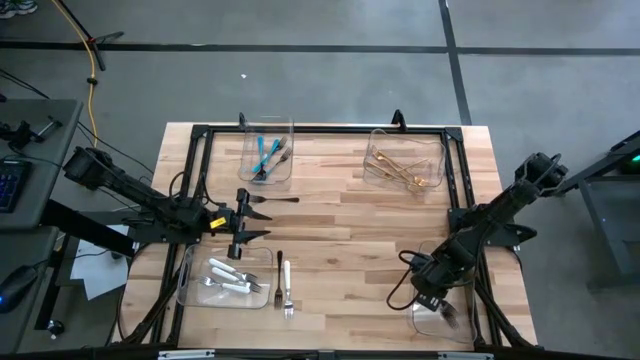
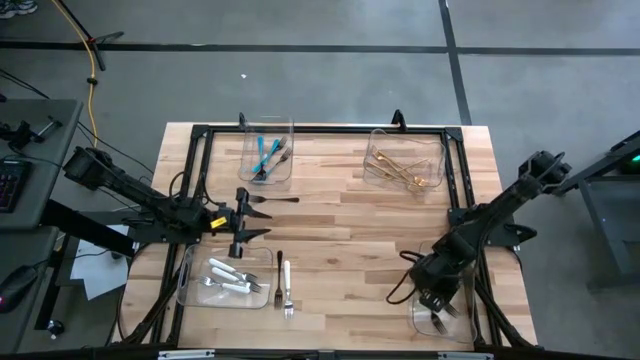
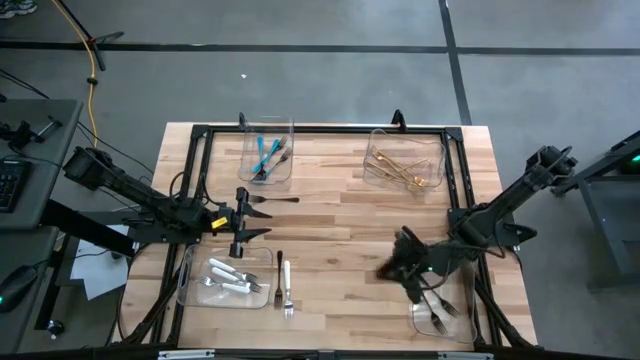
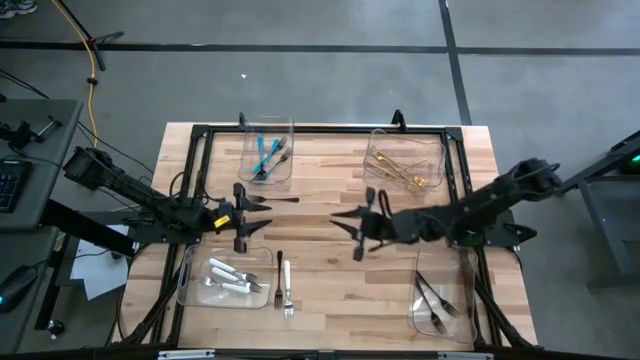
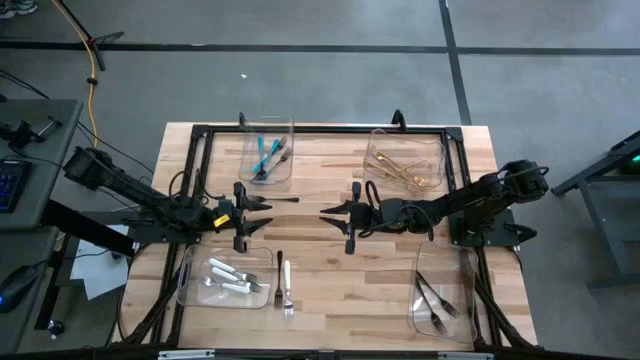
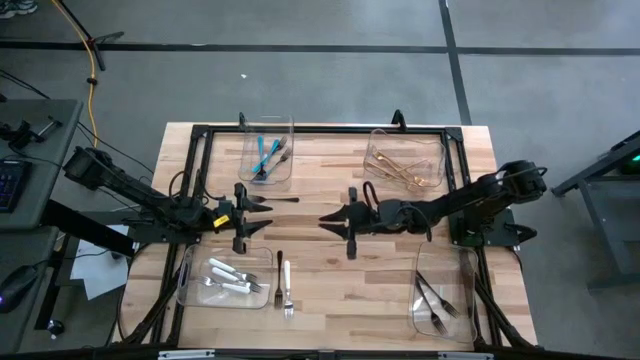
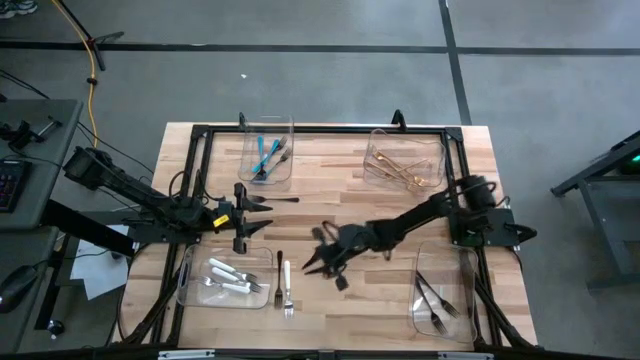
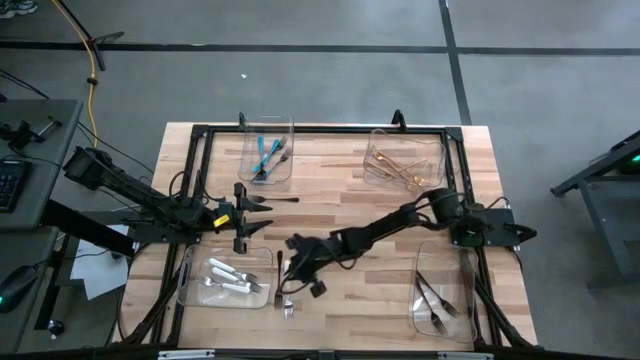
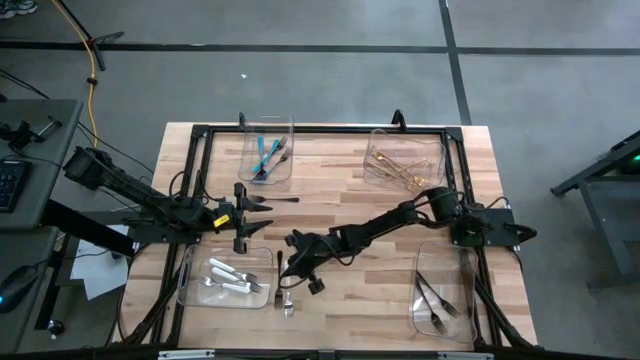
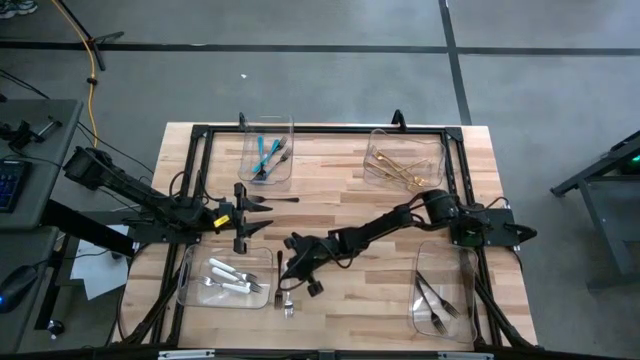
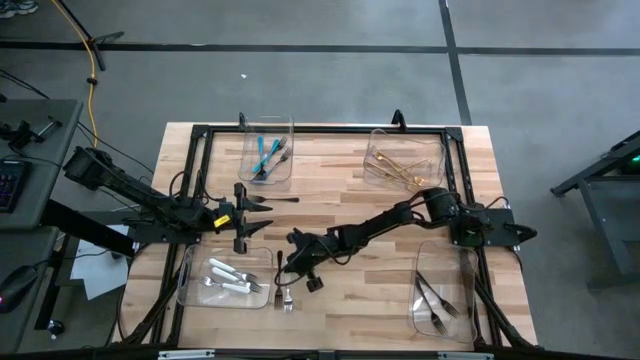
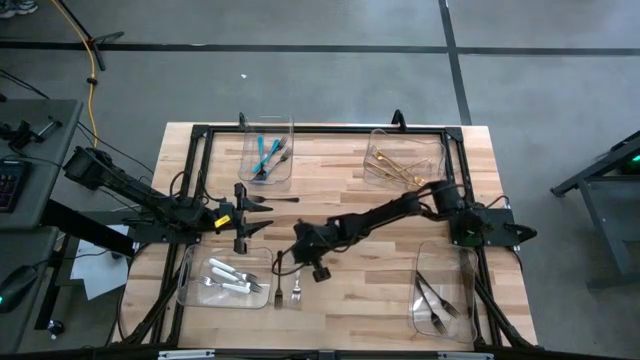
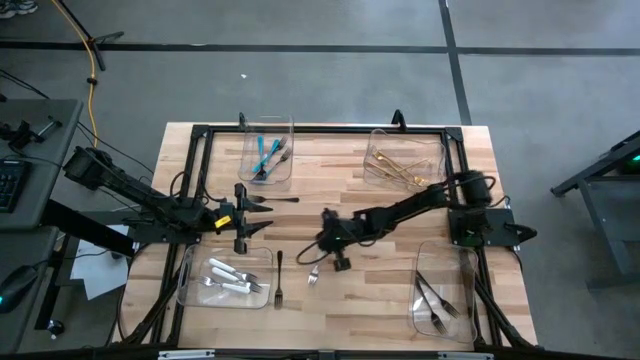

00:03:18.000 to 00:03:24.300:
Task: Sort silverware by color (type)
Move the white fork to the center of the table

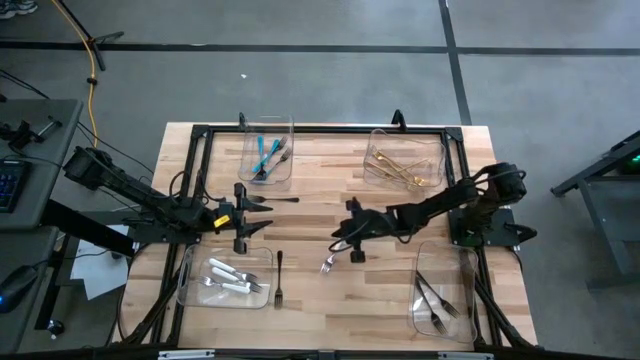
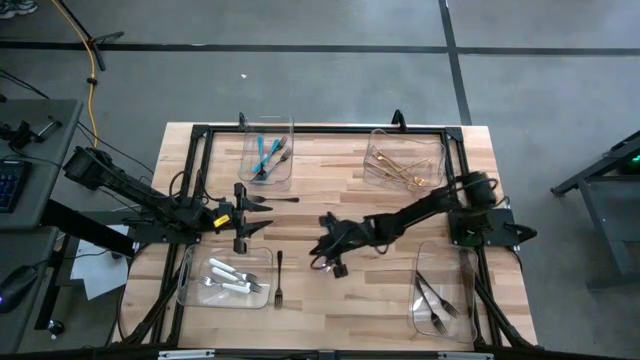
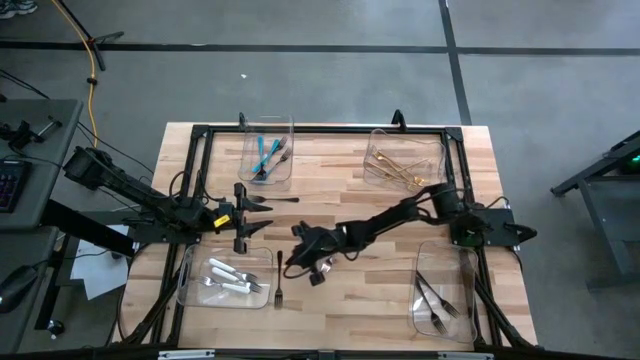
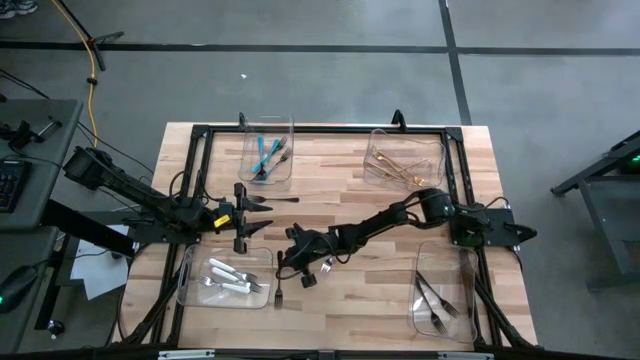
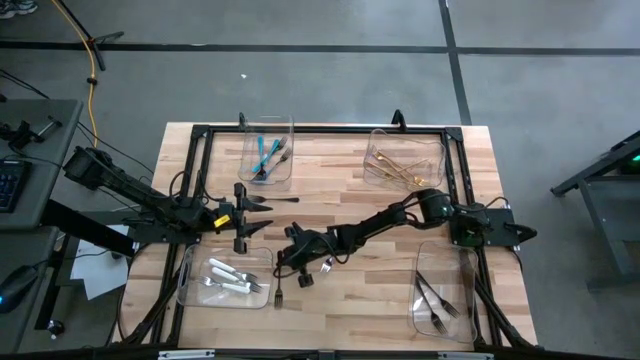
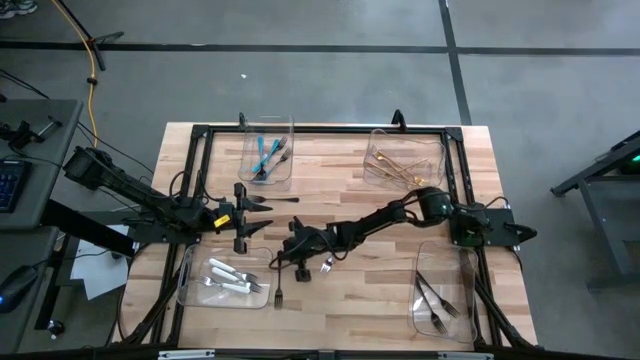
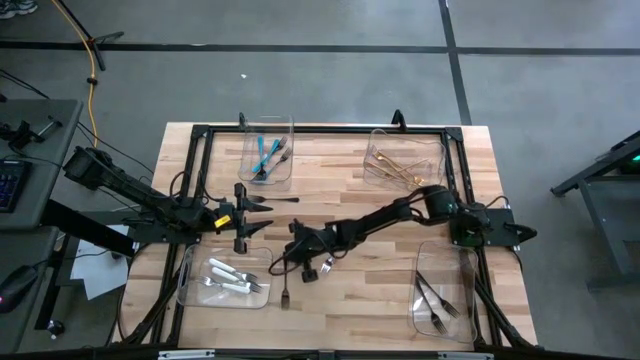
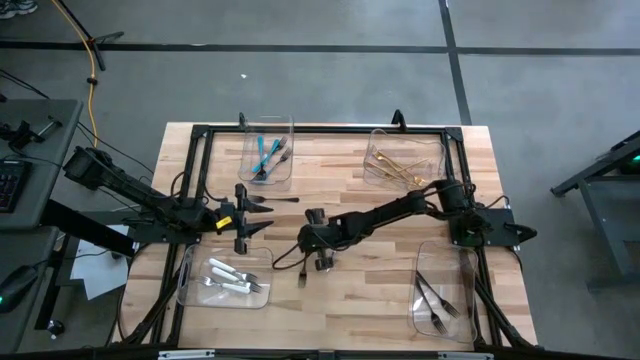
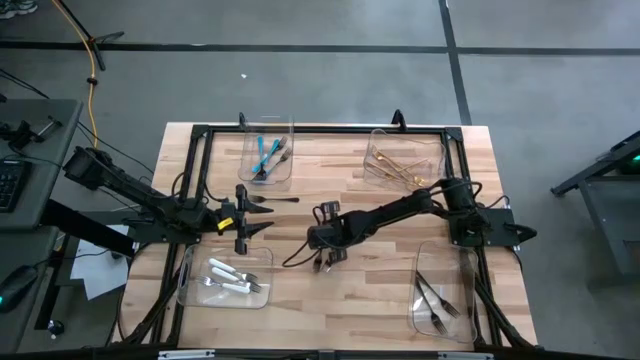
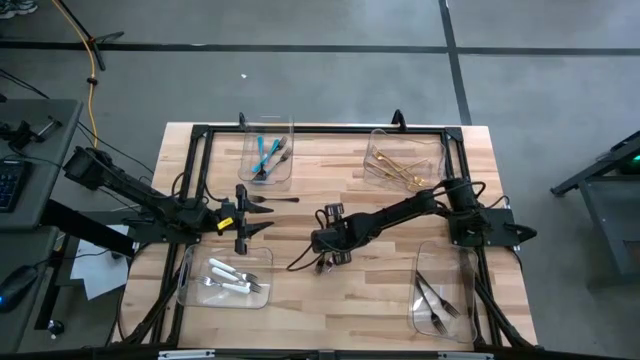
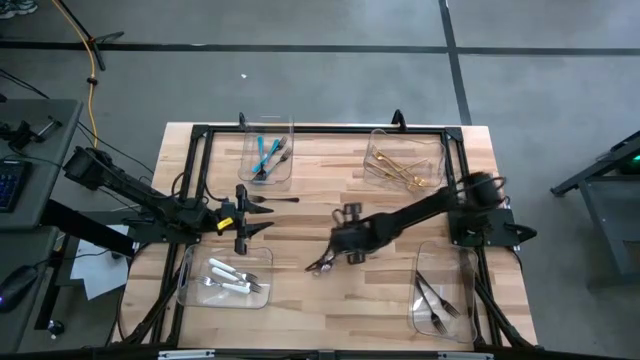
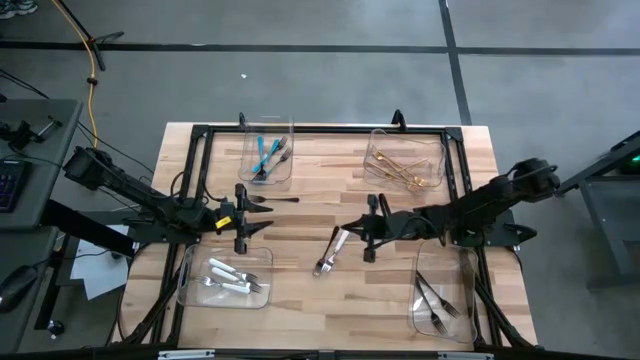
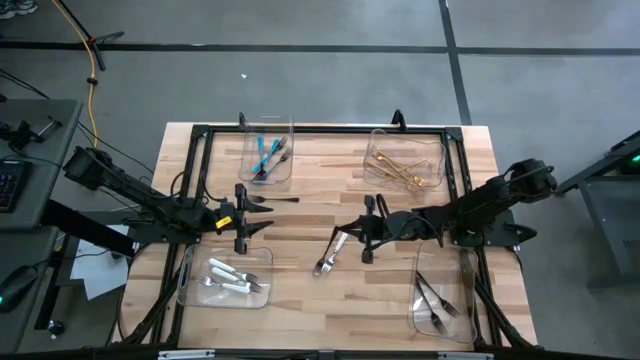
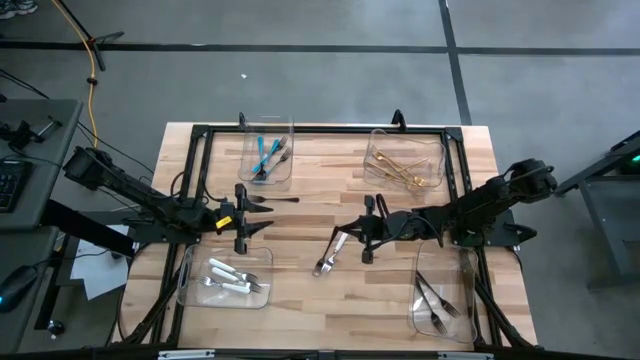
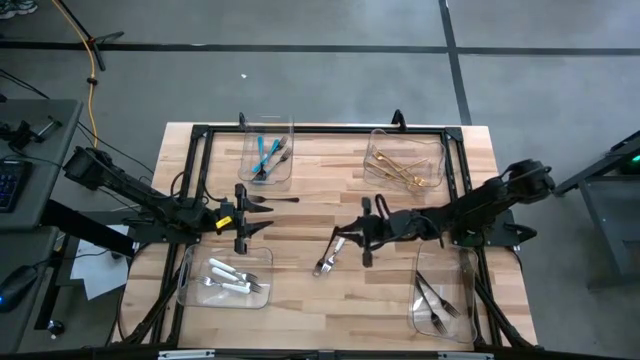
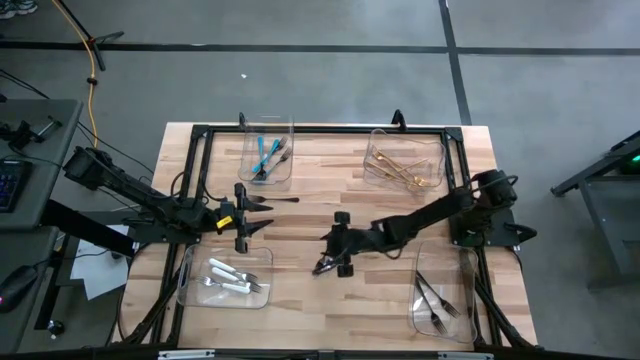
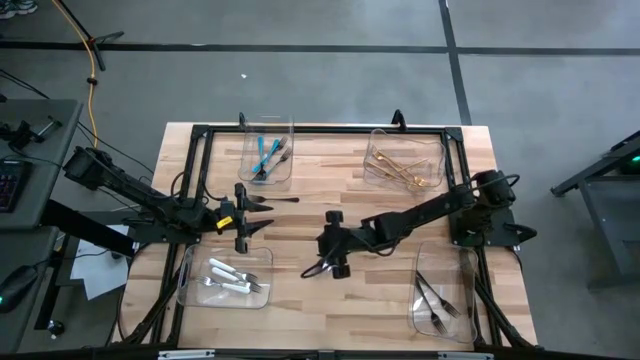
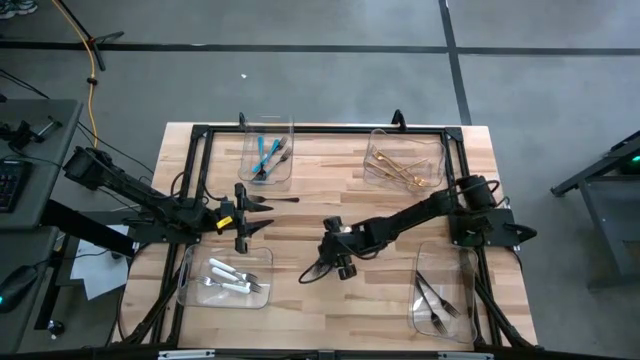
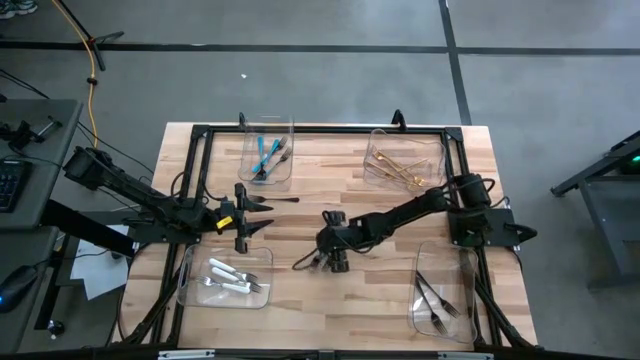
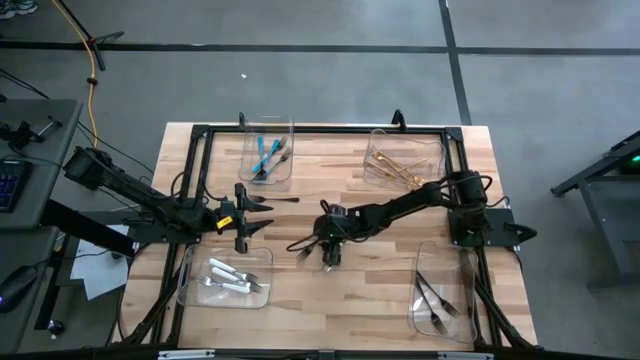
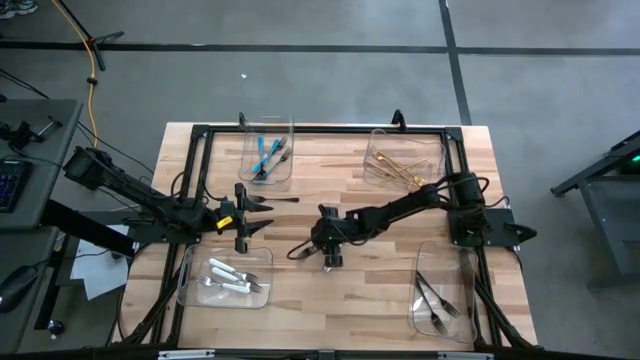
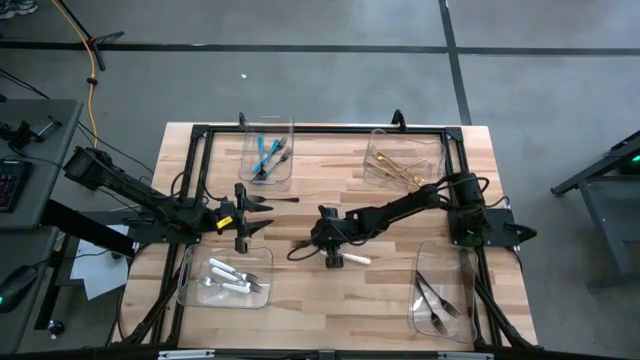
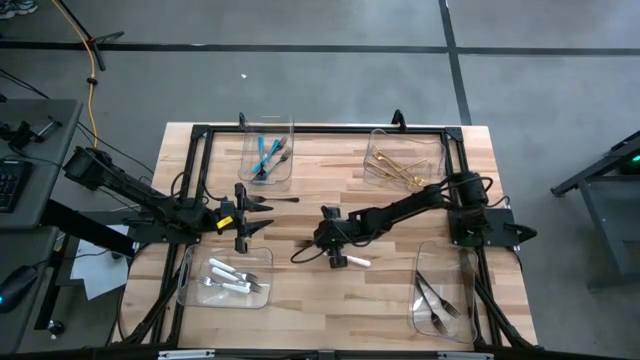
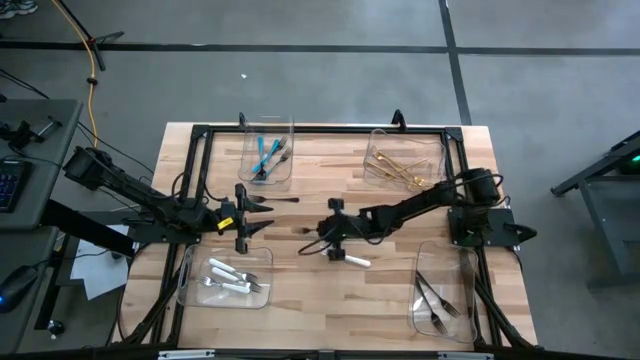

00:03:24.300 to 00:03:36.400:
Put the black fork into the bottom right transparent bin

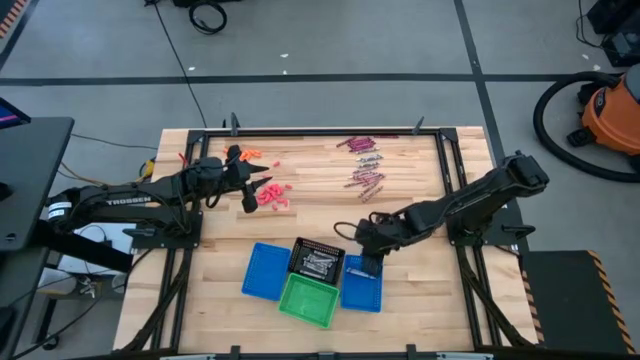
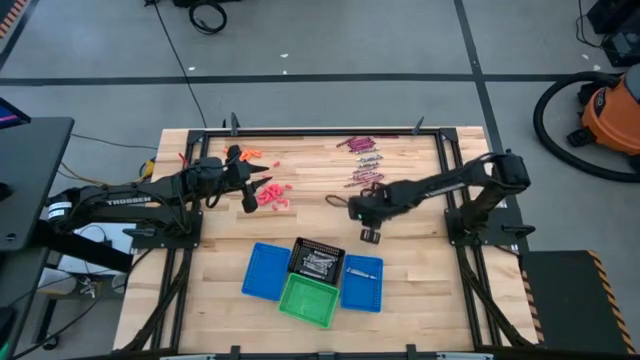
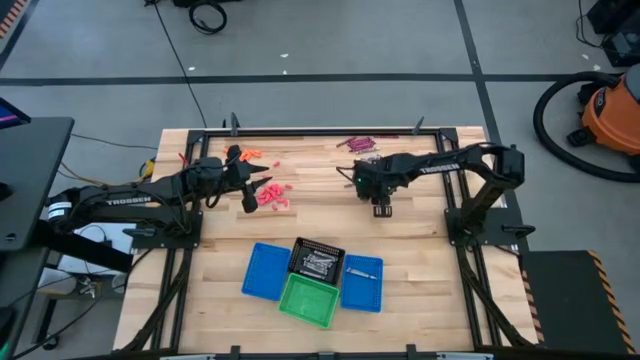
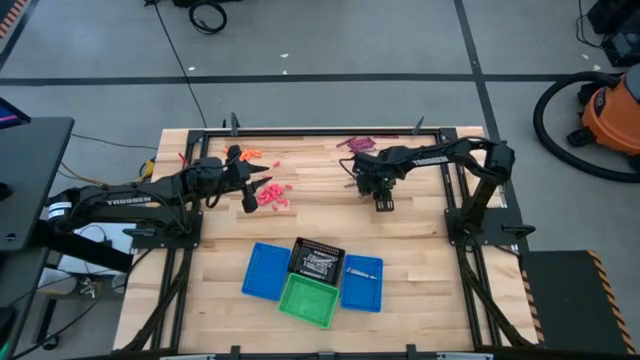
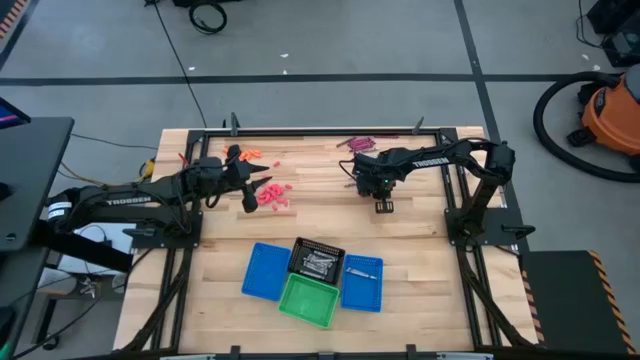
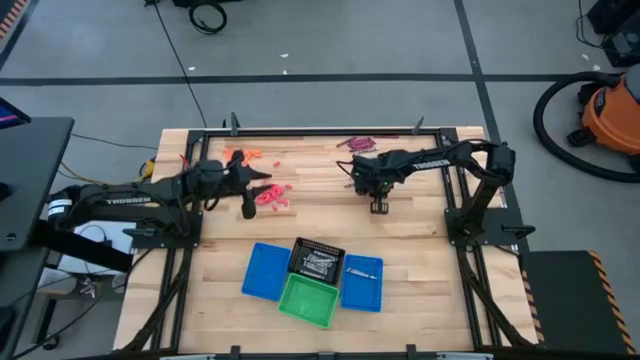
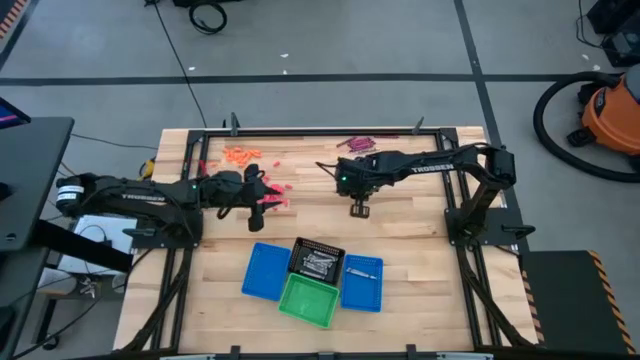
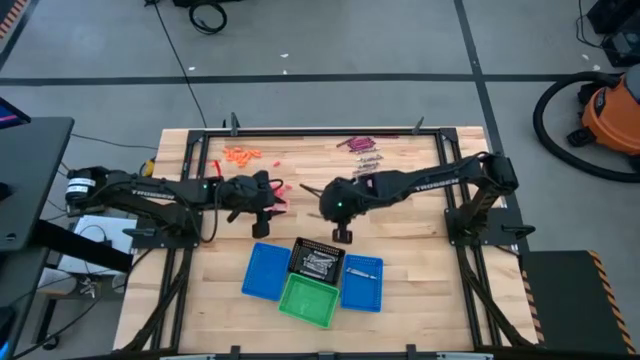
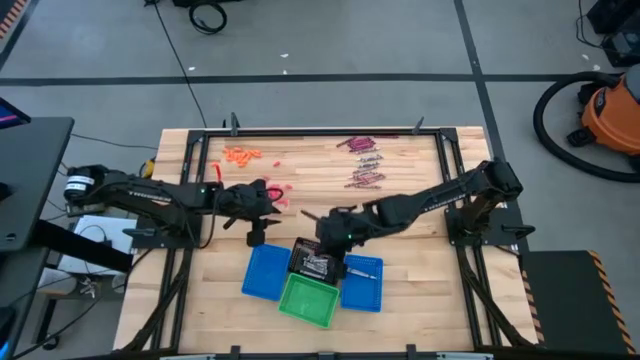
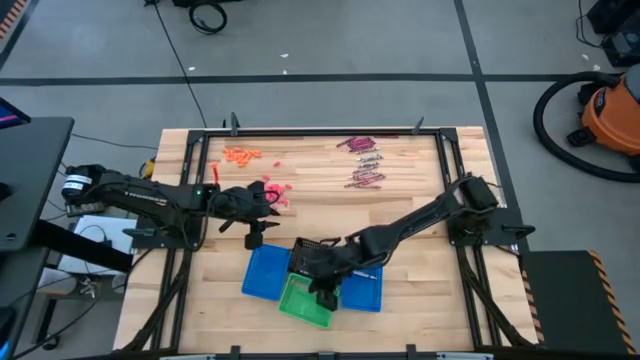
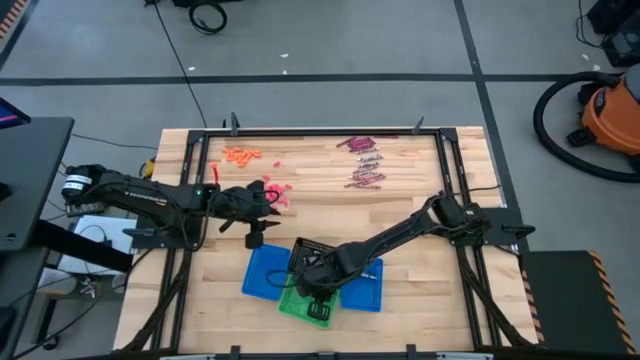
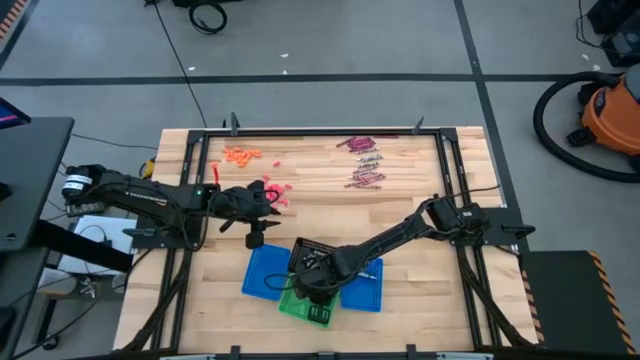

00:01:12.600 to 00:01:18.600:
Task: Sort crayons
Put the pink crayon into the green bin
